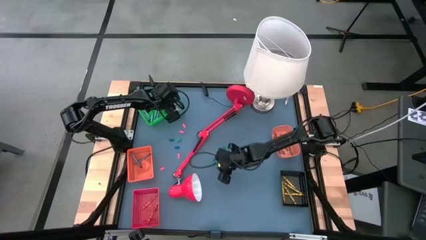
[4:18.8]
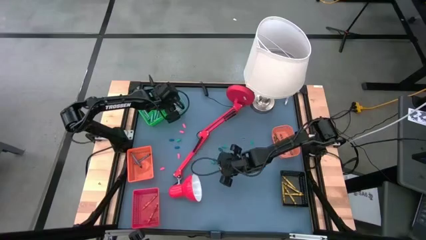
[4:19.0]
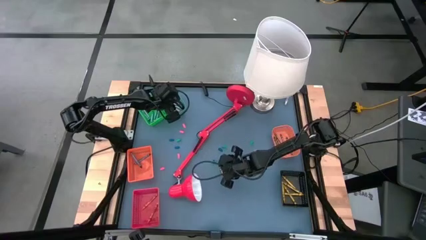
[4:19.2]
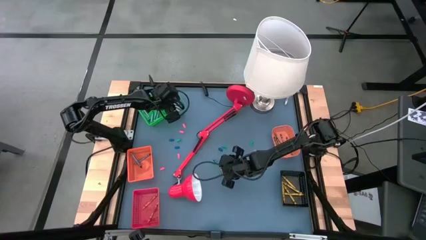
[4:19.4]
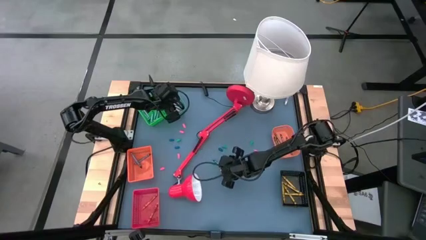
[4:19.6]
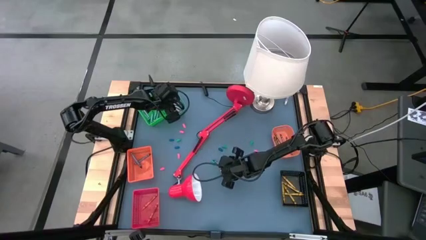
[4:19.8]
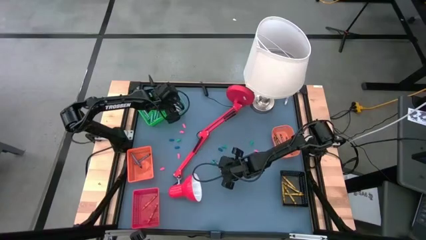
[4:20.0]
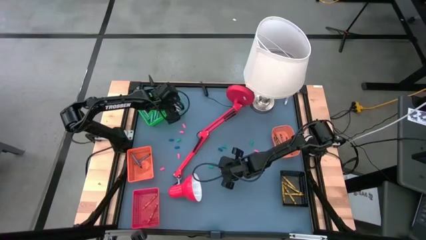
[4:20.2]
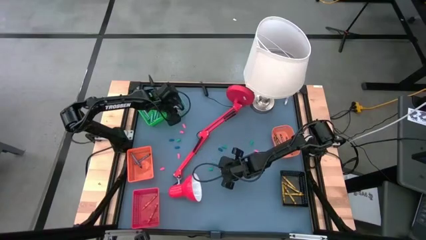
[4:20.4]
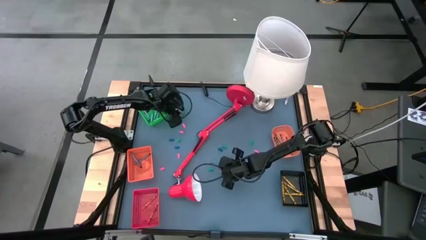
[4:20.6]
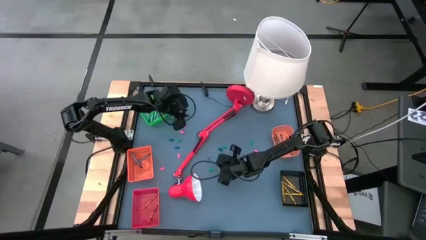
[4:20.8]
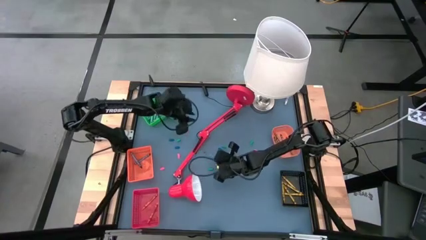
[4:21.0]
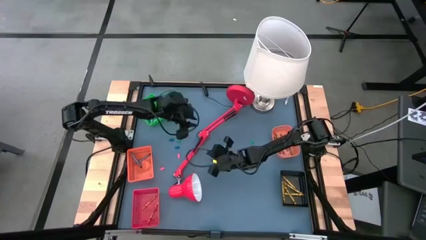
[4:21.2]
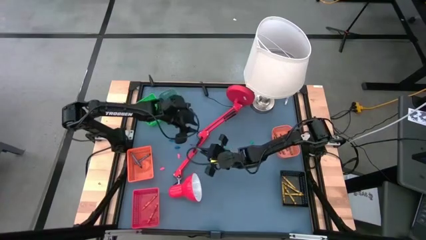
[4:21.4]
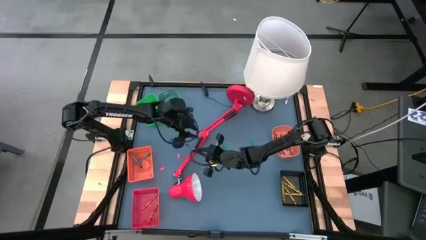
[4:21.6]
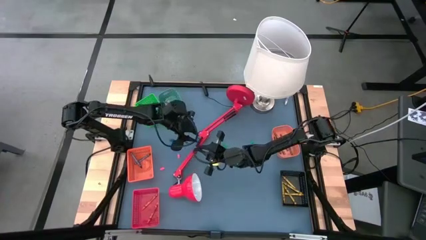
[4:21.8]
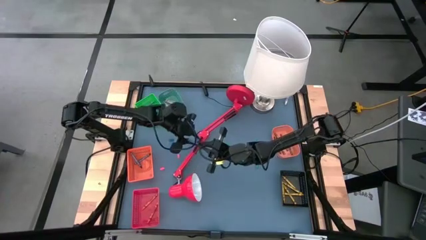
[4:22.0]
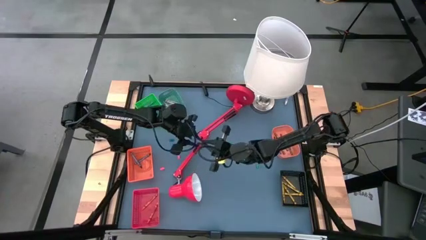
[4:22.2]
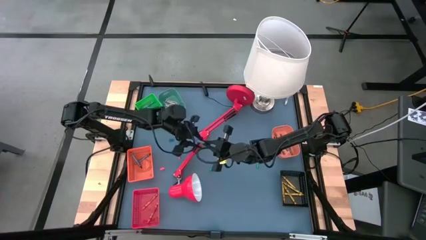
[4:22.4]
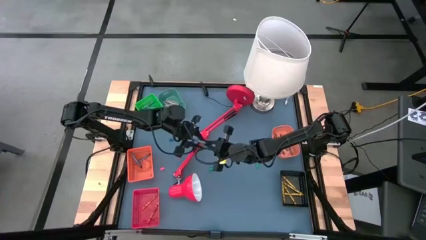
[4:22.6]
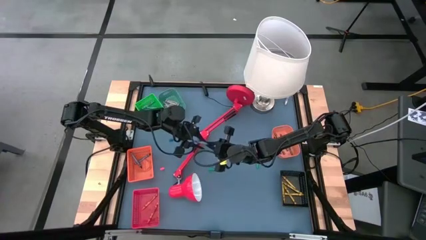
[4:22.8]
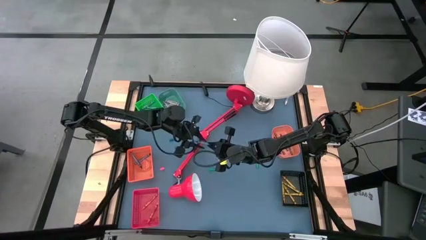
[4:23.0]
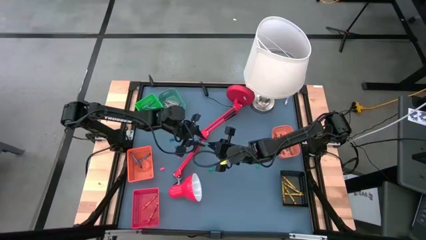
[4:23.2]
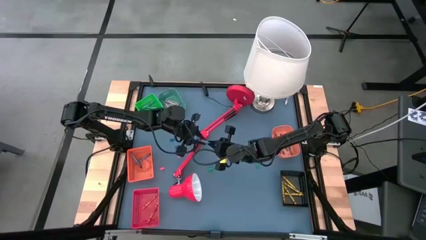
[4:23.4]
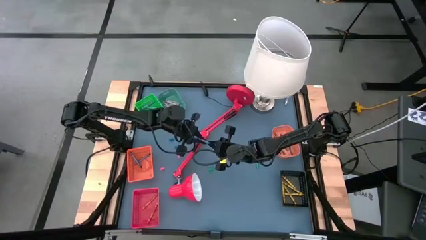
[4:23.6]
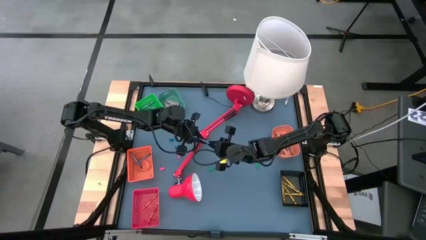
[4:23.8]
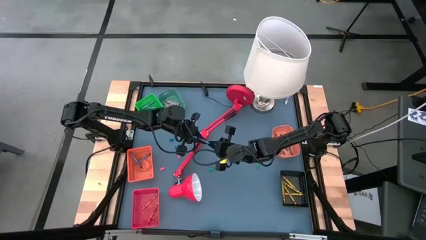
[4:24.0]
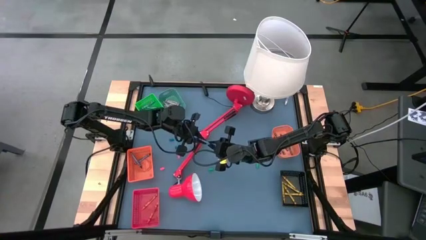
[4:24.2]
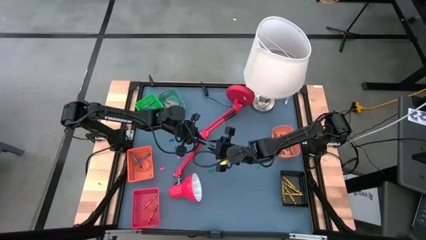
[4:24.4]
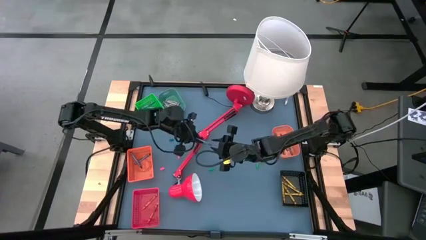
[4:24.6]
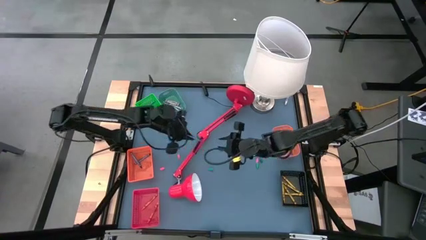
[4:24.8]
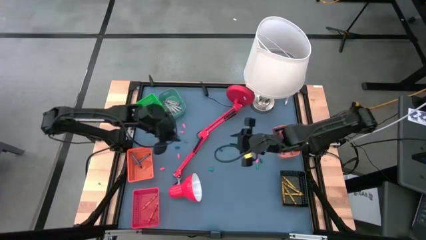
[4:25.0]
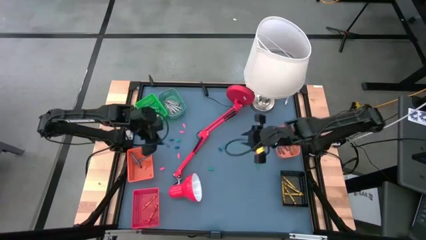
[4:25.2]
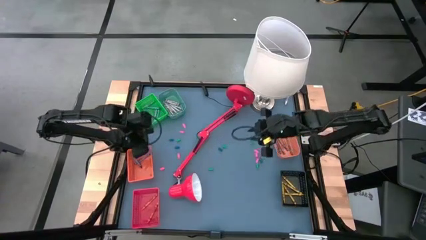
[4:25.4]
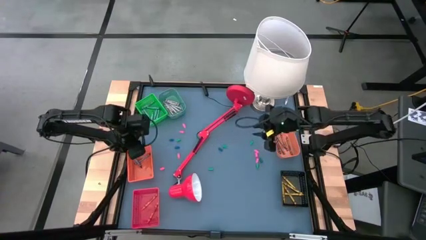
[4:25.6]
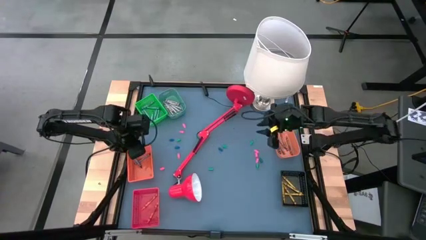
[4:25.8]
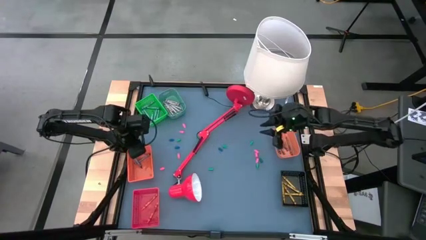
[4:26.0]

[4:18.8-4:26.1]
Task: Sort crayons
Put the dark blue crayon into the left orange bin

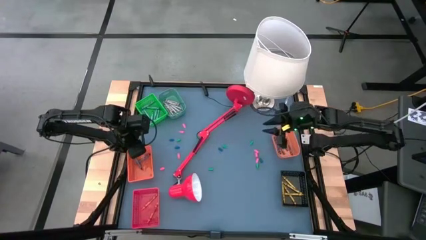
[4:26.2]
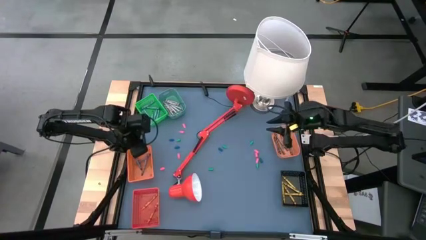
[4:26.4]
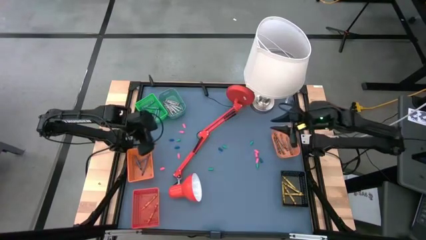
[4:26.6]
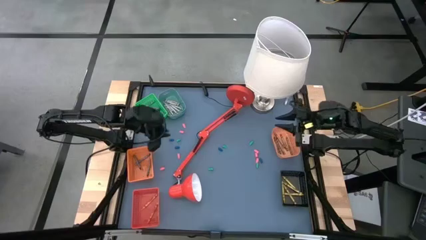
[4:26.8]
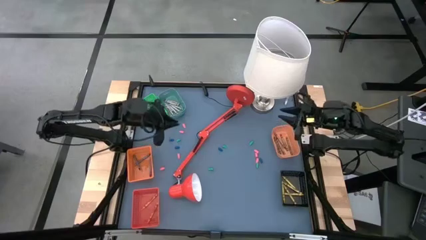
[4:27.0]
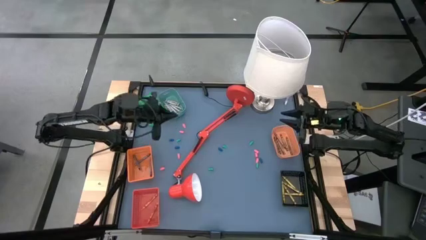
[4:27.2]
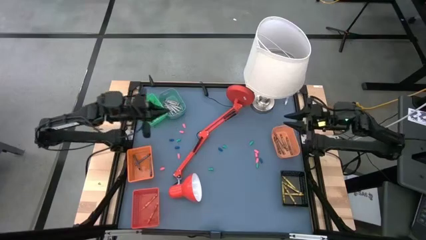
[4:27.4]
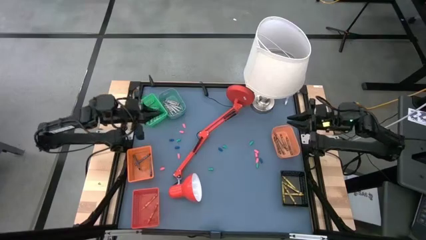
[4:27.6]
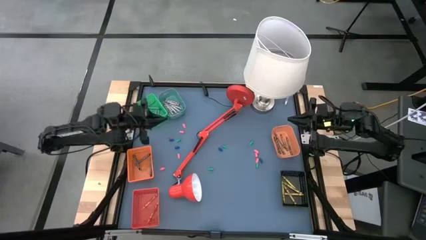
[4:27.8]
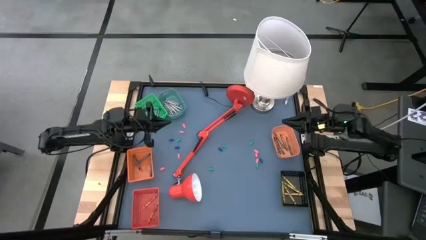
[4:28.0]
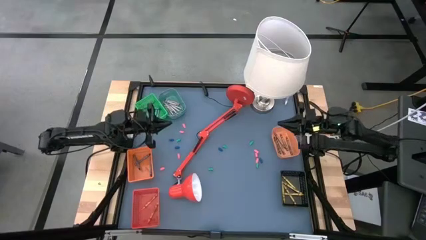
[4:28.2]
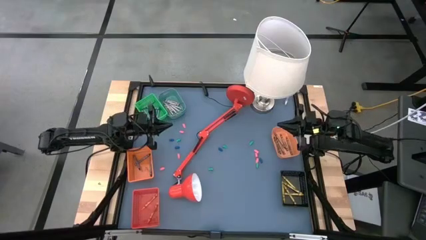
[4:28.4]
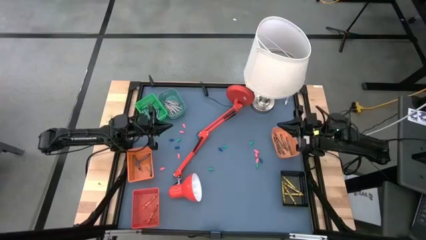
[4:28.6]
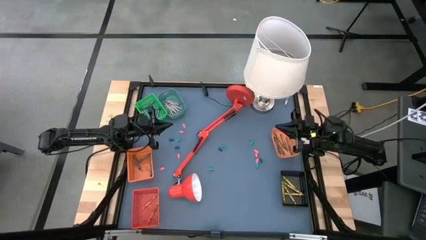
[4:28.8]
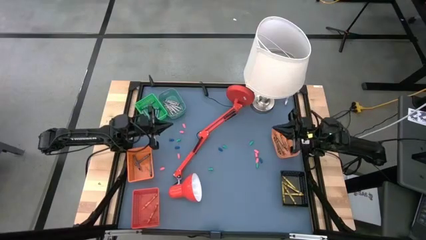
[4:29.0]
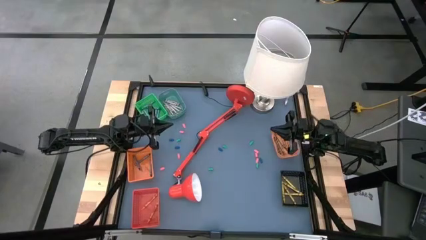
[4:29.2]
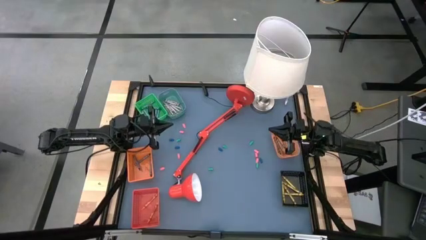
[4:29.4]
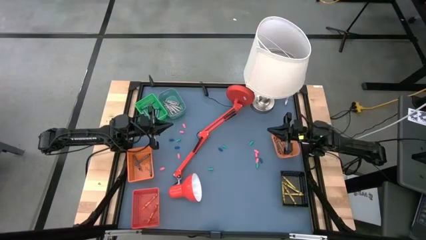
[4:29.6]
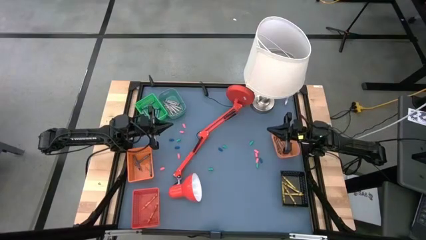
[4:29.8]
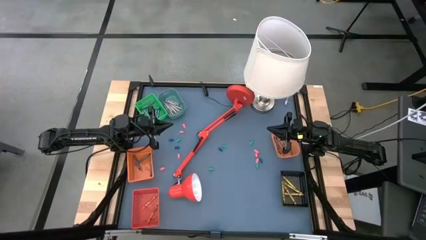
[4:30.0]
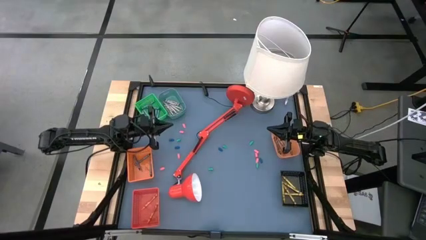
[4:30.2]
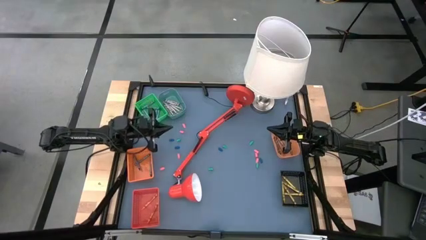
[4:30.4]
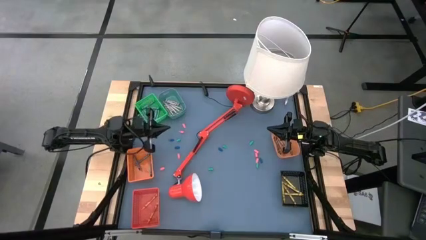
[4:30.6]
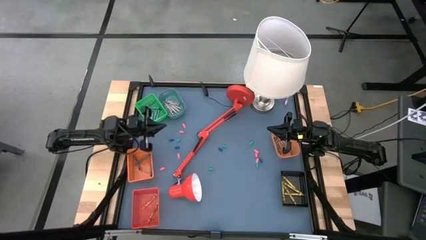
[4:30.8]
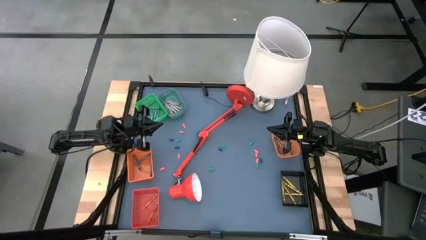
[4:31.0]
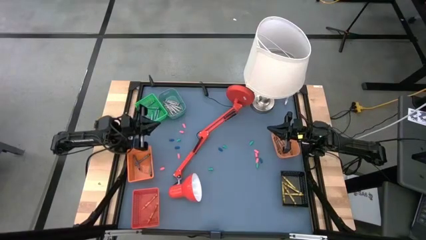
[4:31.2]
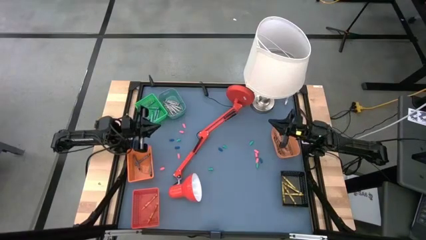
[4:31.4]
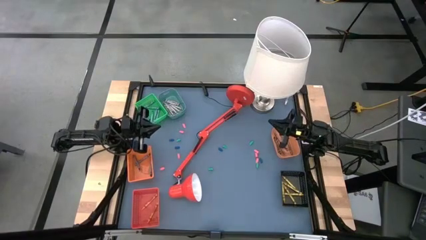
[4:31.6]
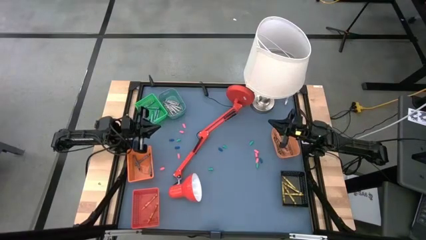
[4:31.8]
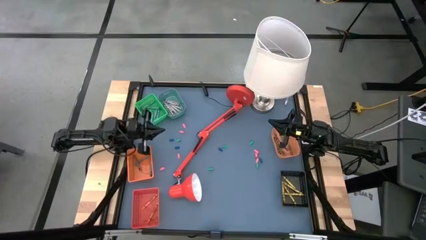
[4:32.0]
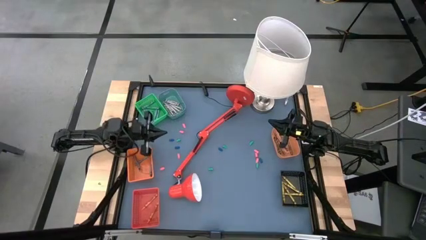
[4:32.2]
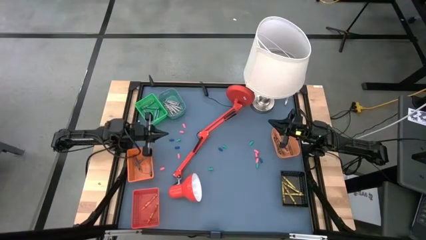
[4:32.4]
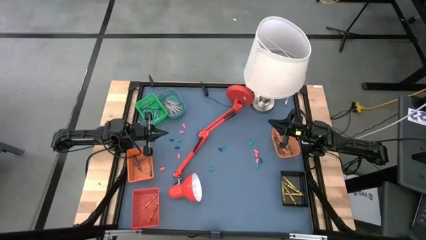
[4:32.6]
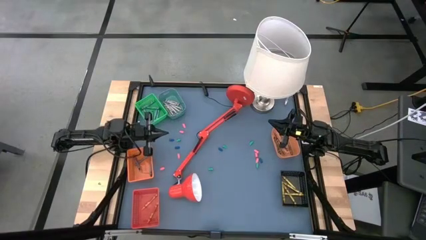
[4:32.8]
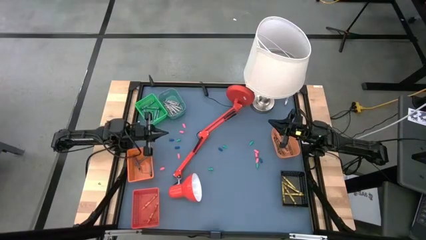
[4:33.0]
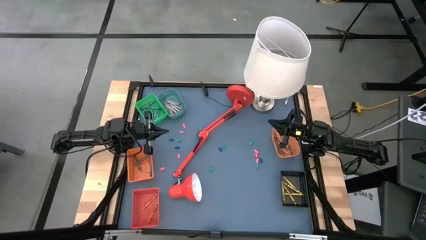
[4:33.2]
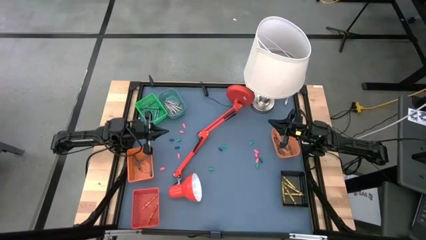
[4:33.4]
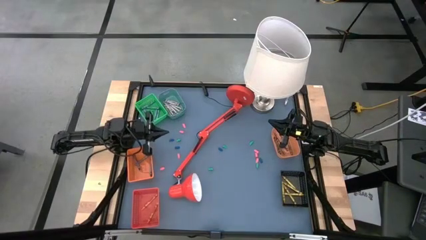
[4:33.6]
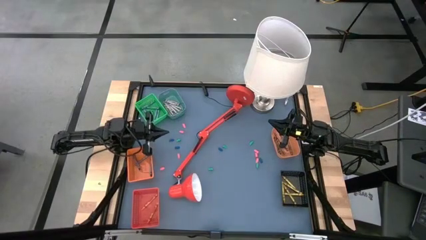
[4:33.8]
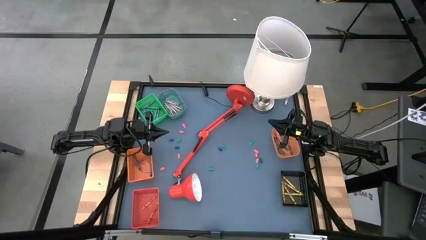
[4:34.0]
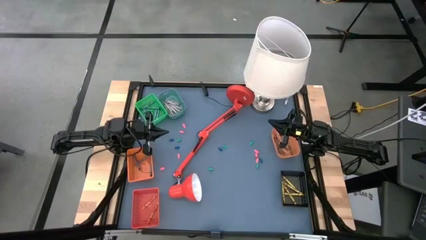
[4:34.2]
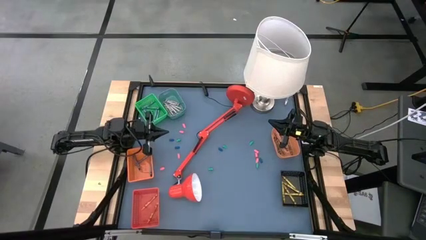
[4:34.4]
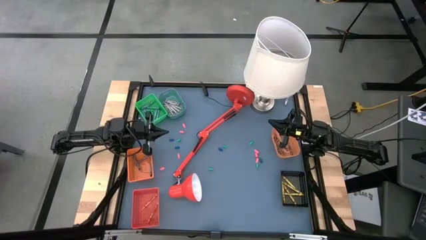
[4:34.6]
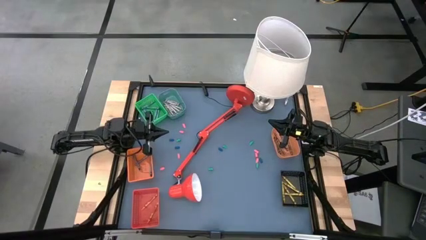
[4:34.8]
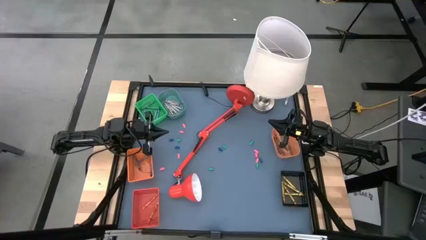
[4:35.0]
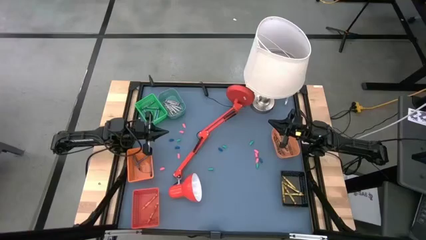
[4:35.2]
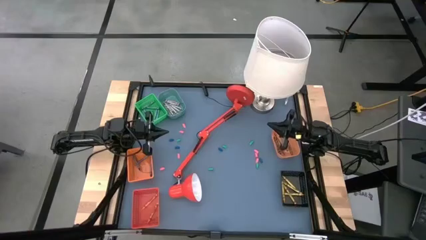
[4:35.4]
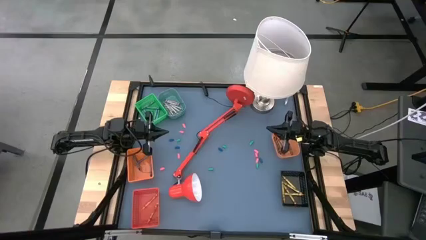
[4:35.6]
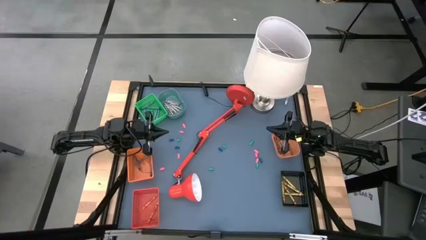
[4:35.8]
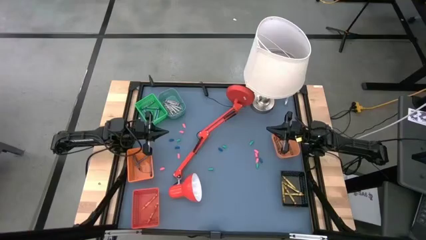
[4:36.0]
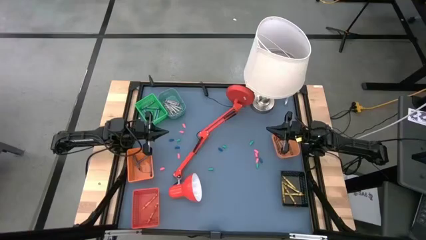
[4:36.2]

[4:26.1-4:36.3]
Return to Home Position
